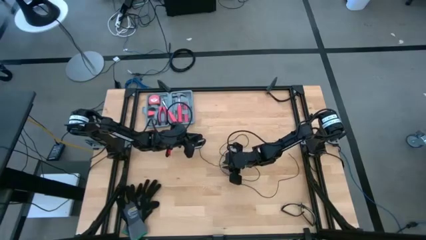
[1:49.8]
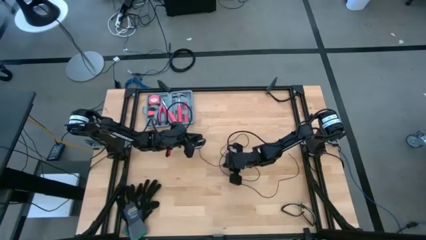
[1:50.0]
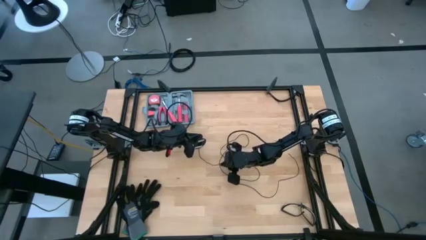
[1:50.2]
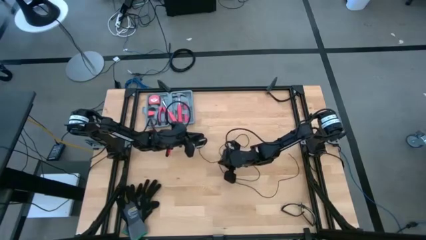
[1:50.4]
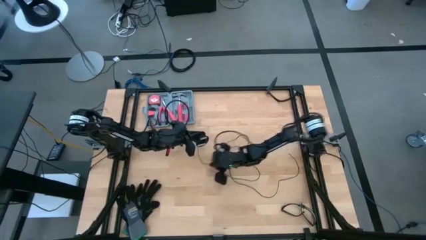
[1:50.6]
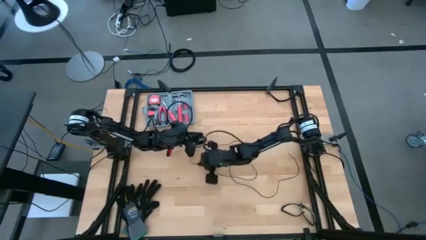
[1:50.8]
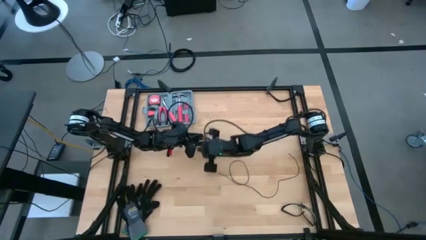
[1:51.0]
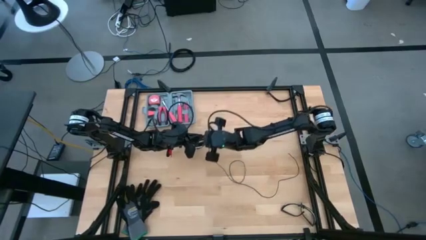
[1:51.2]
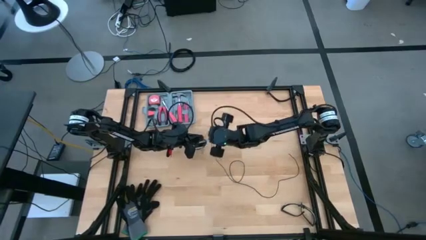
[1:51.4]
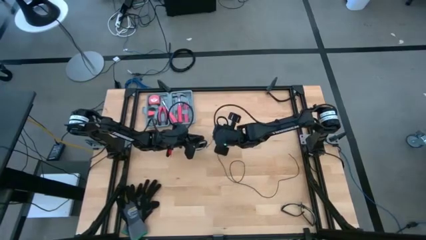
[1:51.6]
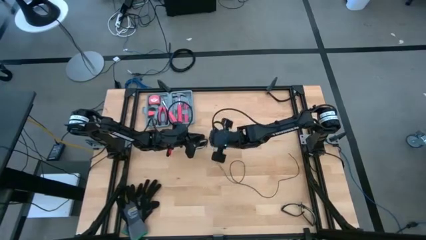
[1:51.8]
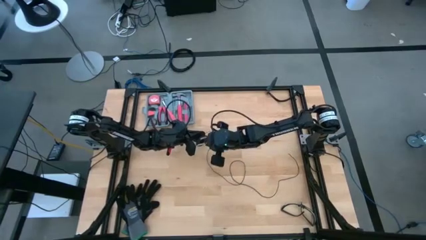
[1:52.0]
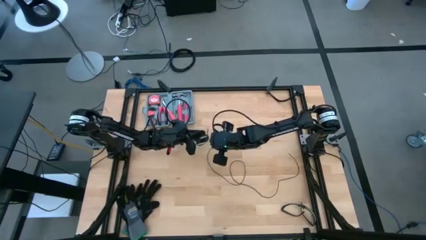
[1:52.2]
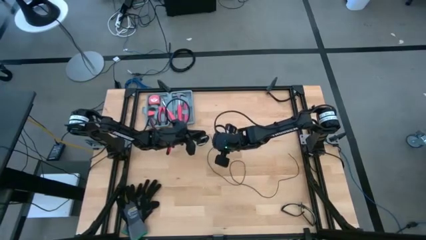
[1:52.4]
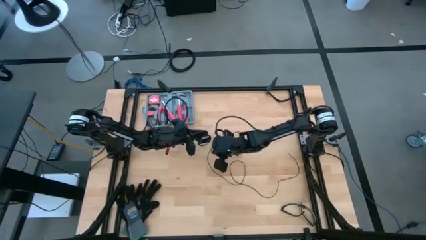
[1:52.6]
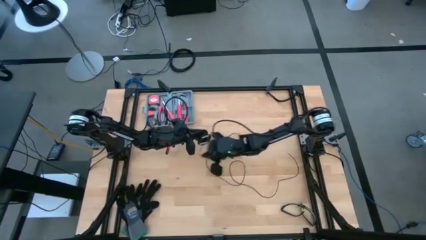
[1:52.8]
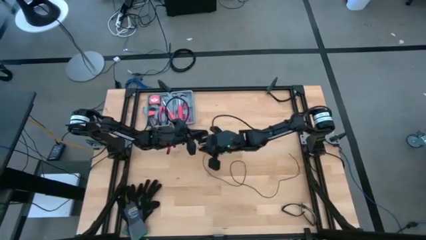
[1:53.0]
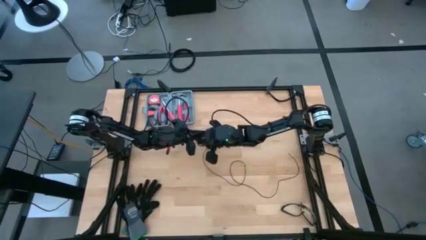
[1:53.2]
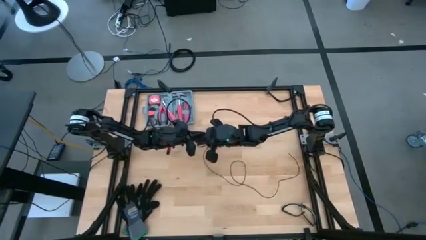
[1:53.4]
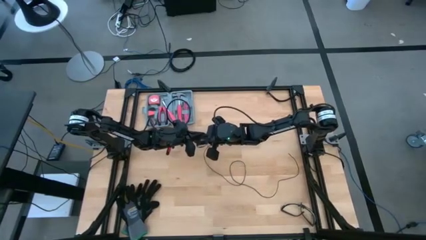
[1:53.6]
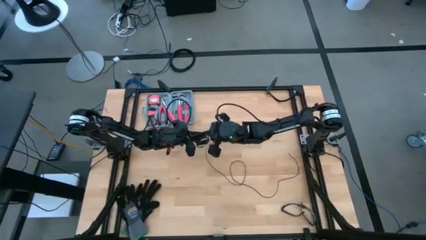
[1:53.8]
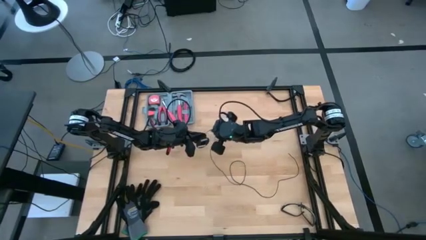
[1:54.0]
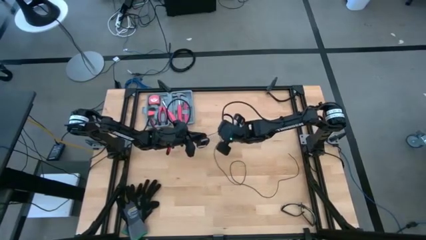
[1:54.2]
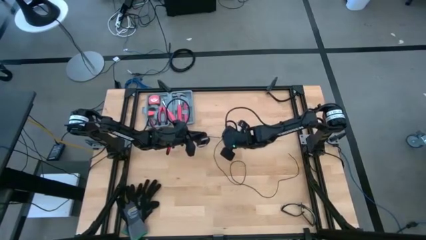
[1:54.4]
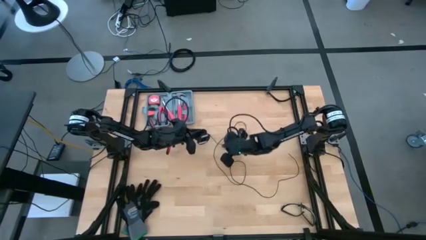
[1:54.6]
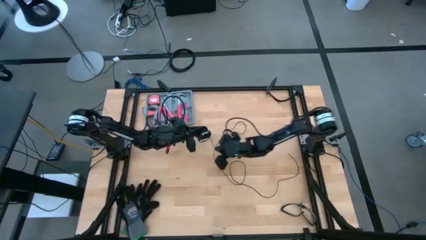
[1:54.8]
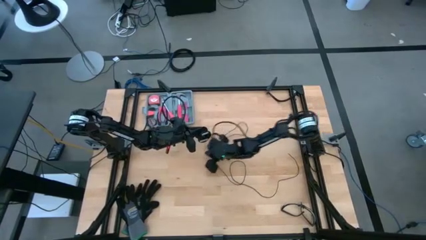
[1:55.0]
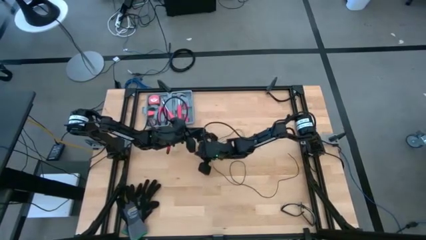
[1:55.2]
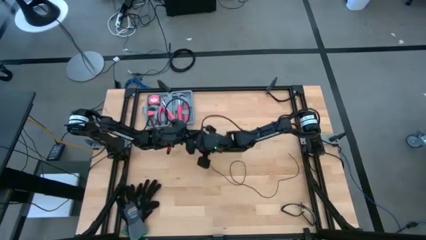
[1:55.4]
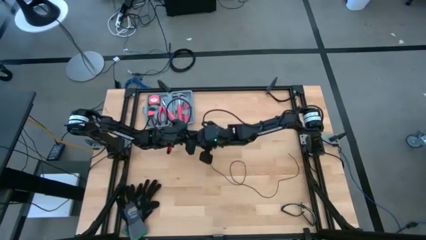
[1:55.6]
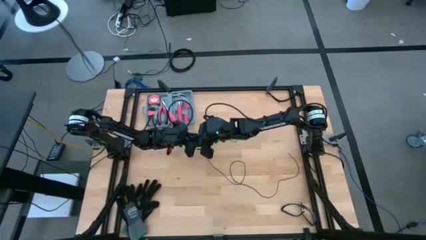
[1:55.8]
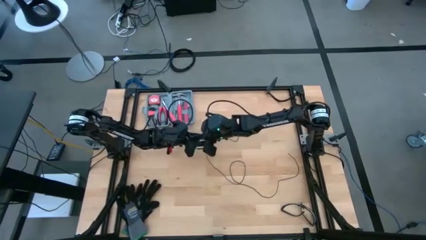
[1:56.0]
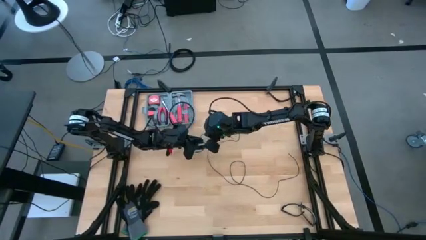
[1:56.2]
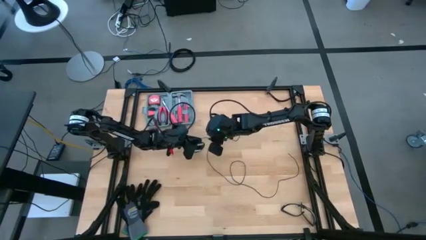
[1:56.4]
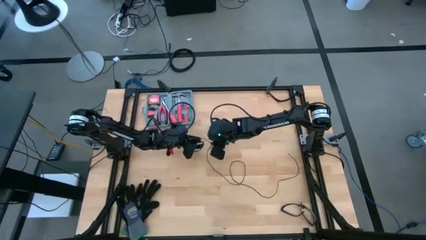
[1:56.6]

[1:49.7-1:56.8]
Task: Coil cords
Coil the black wire onto the spool

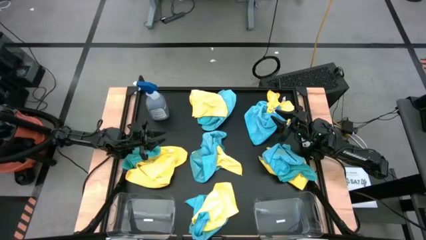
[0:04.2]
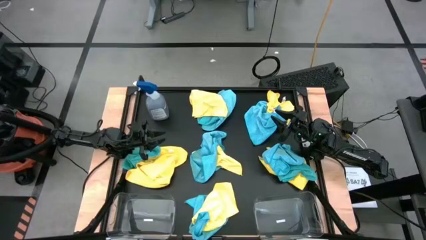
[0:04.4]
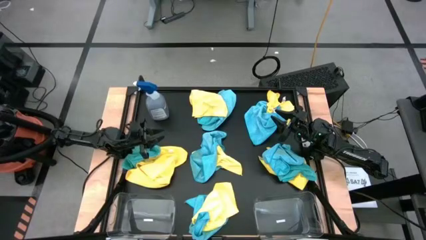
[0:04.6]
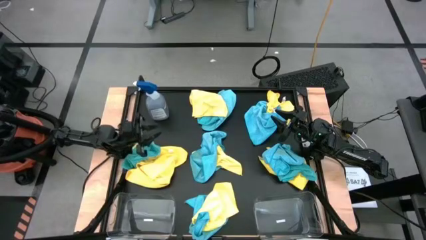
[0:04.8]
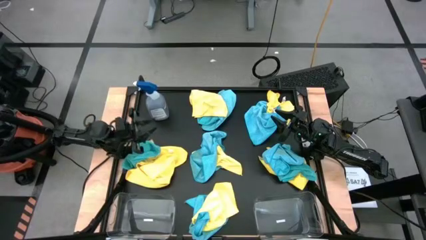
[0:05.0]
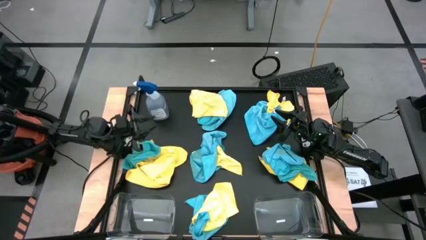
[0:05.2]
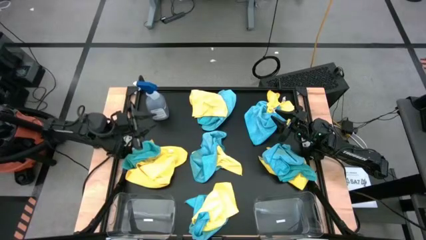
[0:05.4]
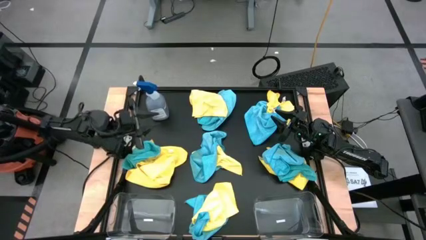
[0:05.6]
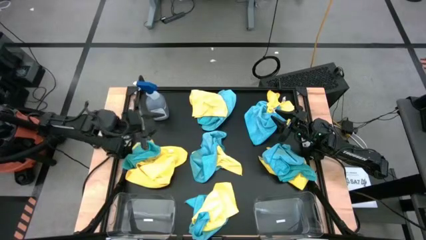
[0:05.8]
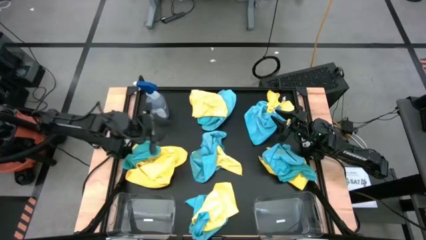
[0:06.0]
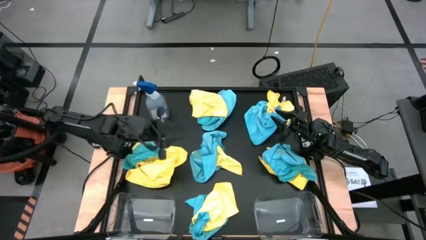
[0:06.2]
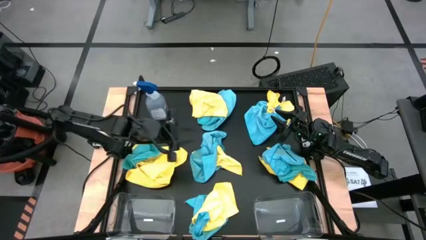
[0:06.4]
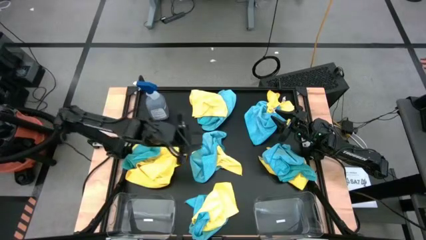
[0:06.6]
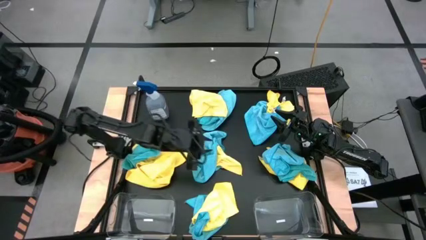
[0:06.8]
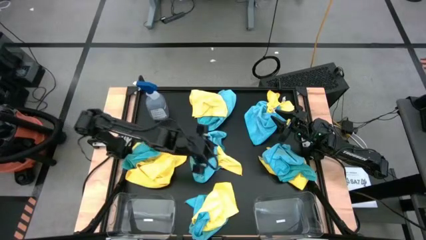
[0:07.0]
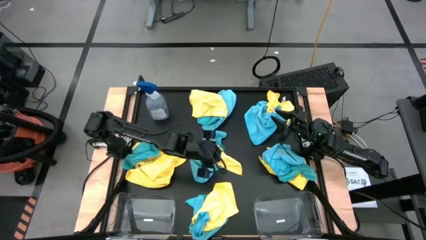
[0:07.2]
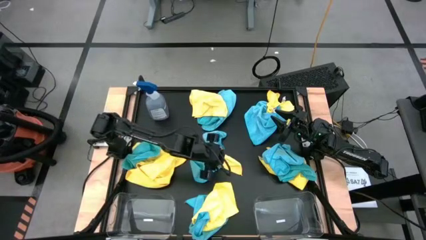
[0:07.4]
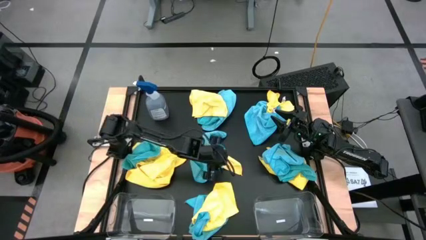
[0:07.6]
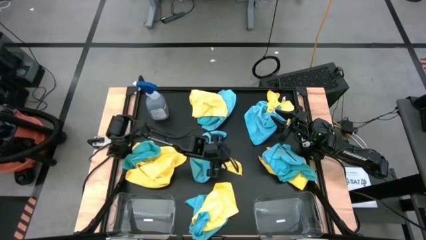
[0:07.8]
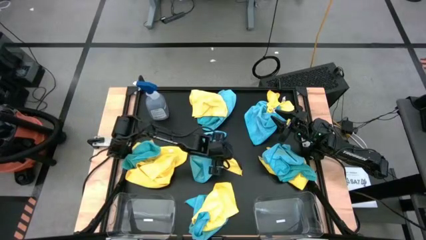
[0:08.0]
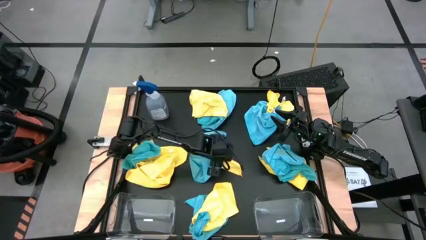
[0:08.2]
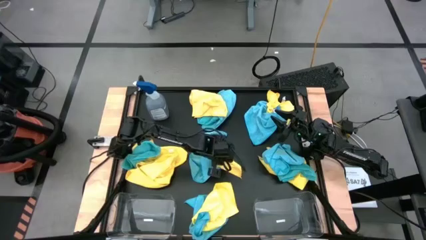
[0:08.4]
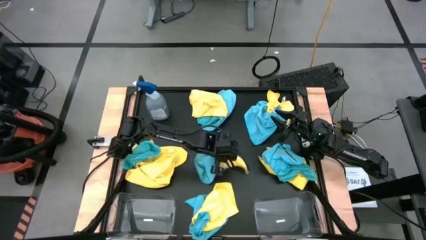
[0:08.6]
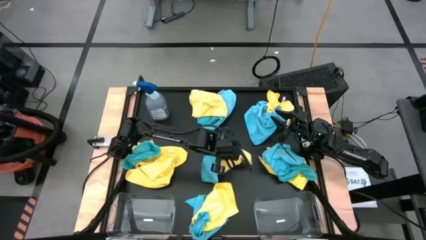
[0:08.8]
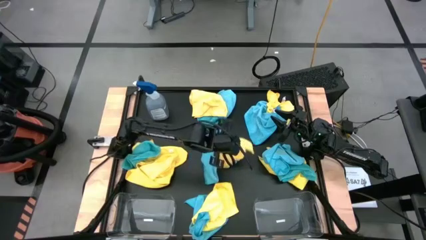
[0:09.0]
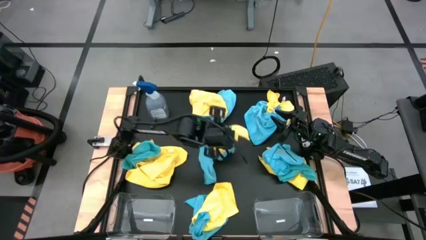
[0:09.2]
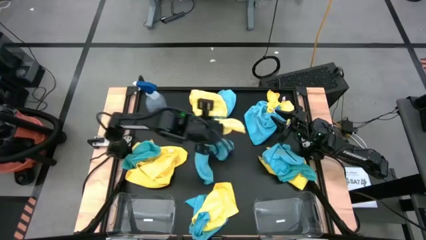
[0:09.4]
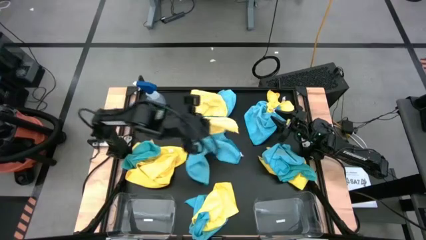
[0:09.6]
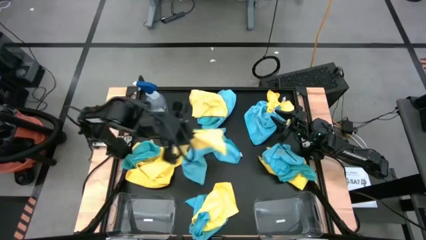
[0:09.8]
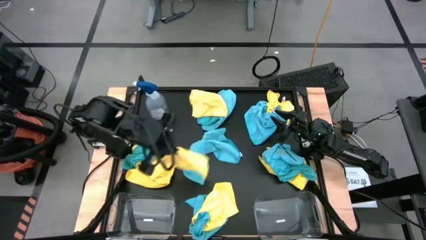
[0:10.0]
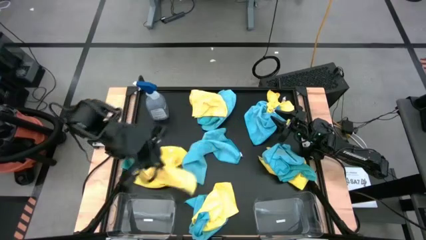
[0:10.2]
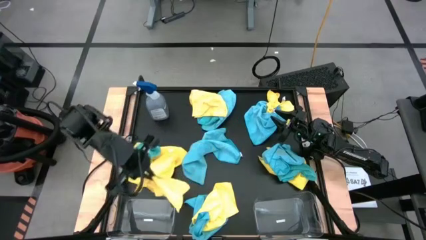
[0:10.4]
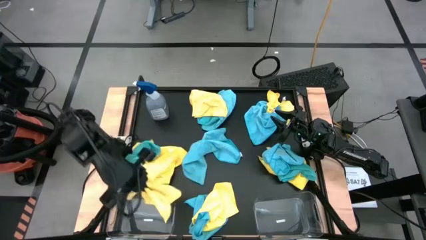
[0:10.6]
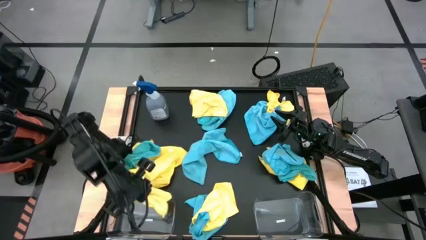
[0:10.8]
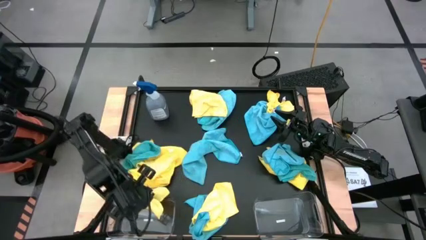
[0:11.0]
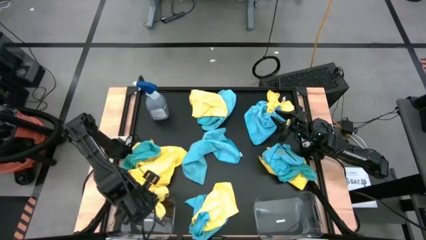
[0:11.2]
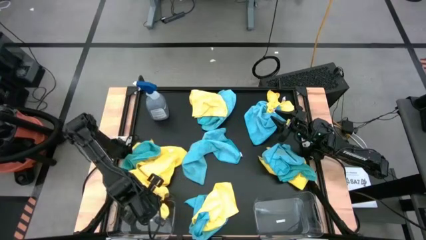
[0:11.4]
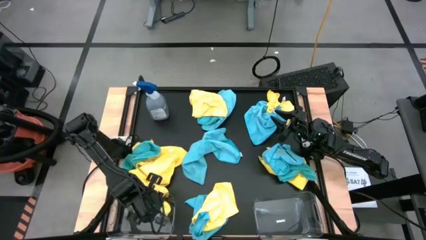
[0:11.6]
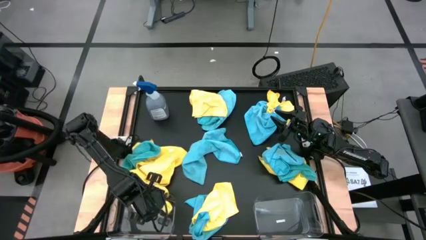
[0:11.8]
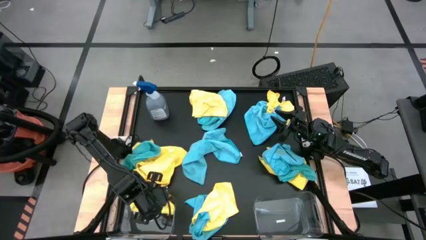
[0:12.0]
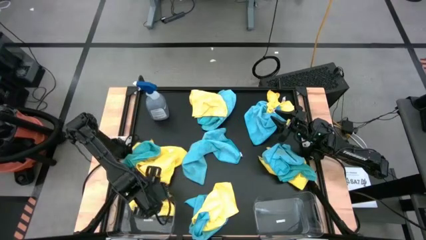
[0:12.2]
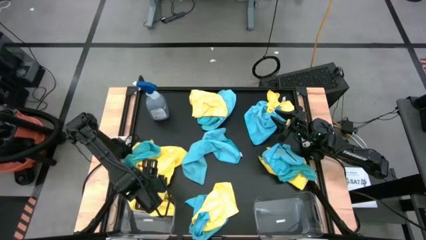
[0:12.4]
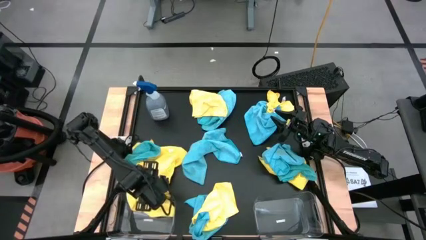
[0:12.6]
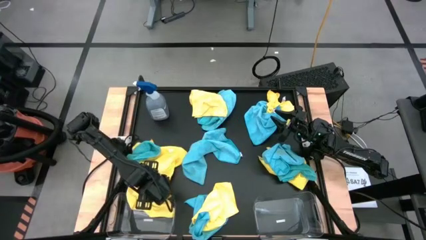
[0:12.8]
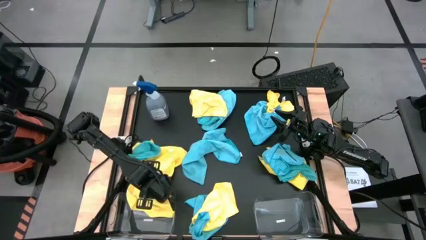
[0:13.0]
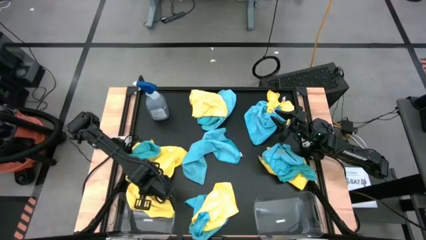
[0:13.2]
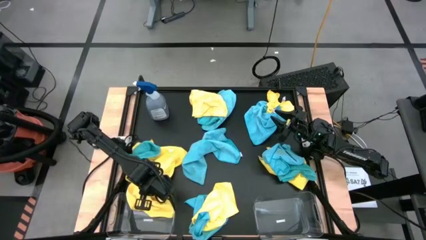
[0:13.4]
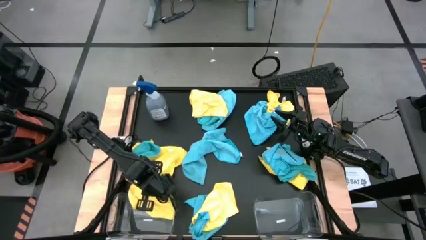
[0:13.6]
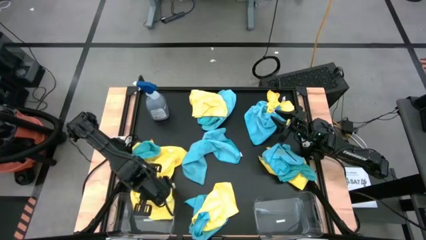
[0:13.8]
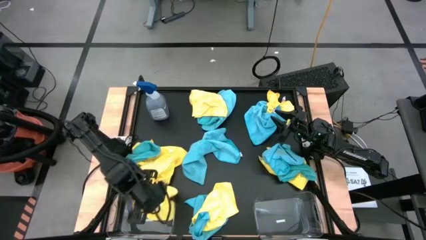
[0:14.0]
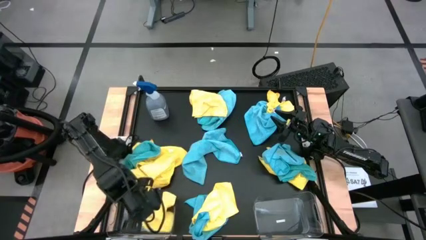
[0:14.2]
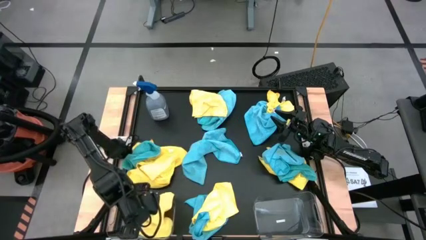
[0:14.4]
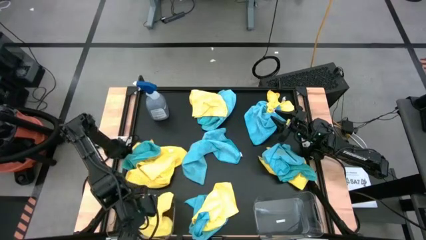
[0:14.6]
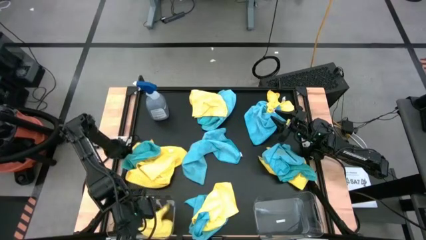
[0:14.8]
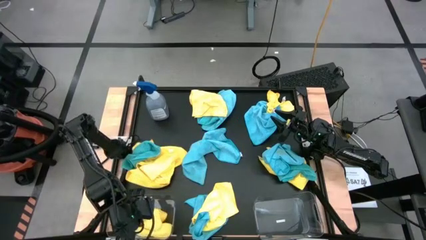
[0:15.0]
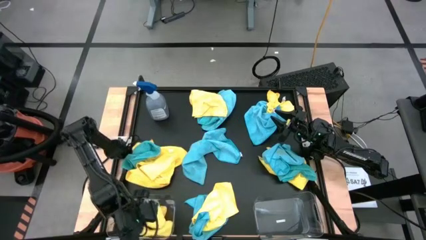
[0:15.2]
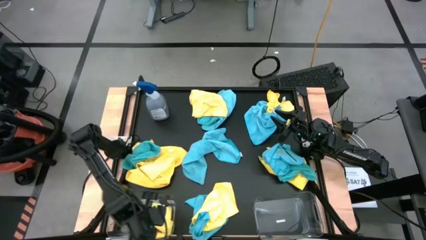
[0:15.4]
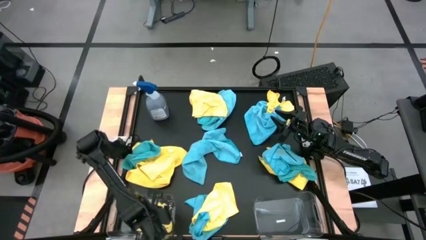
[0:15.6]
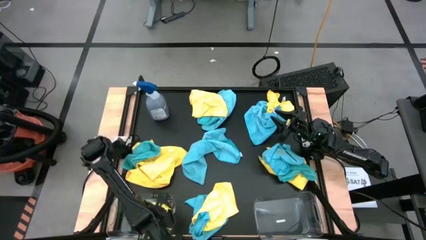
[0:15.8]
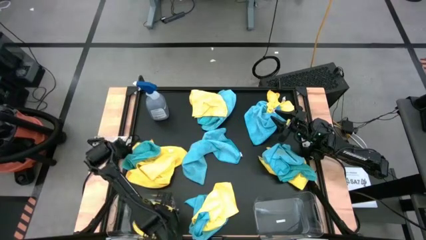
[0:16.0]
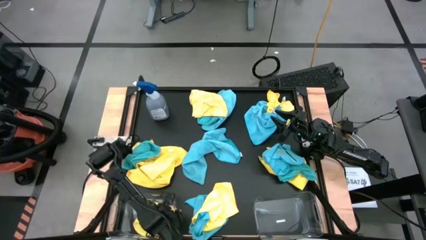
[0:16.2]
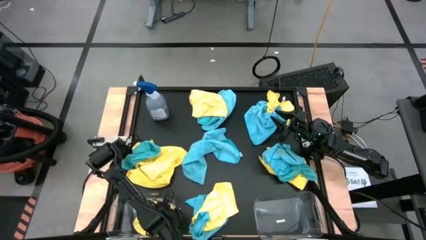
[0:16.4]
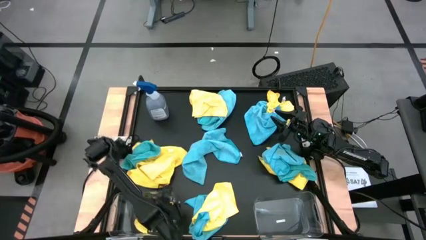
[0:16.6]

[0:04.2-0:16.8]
Task: Sort microfiber towel by color & place in baskets
Put the yellow towel into the left transparent bin
